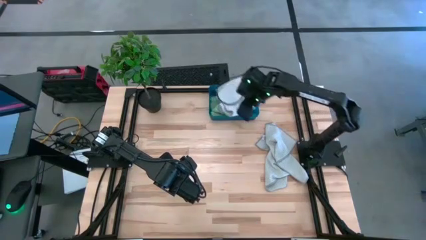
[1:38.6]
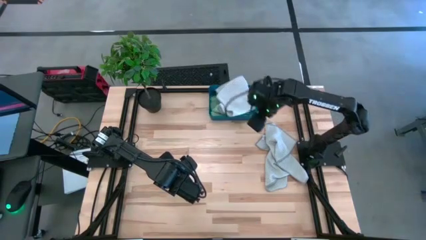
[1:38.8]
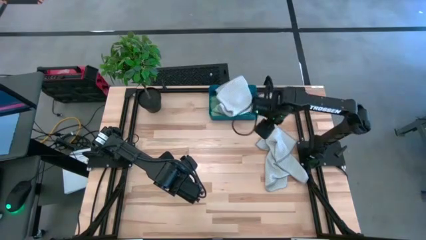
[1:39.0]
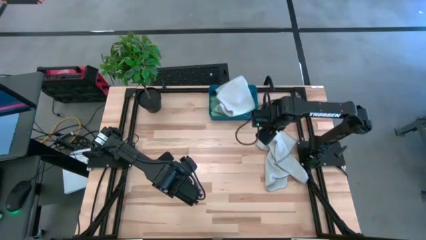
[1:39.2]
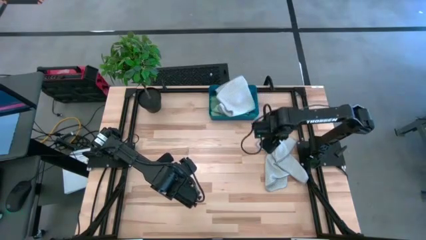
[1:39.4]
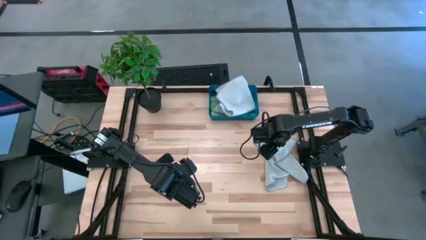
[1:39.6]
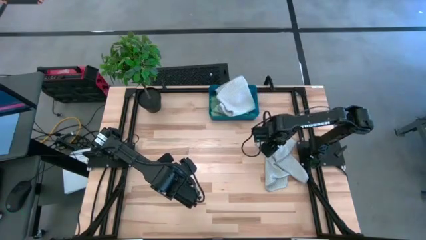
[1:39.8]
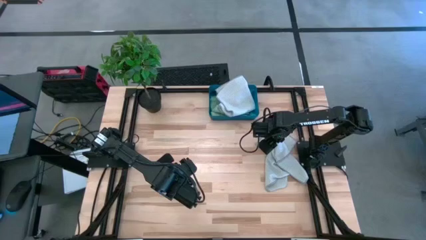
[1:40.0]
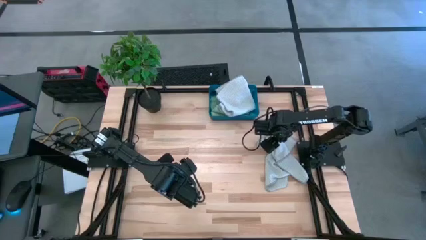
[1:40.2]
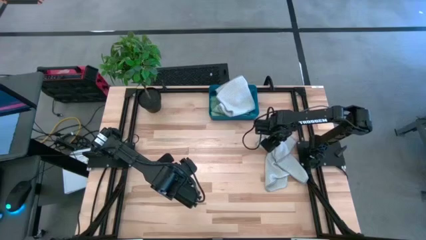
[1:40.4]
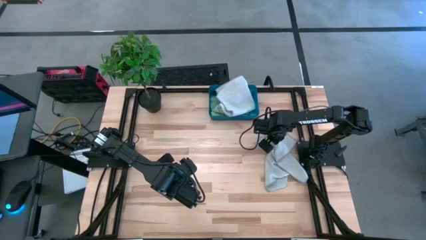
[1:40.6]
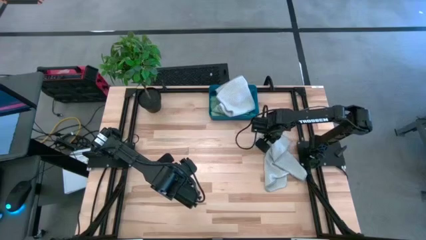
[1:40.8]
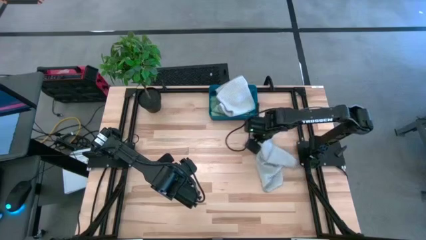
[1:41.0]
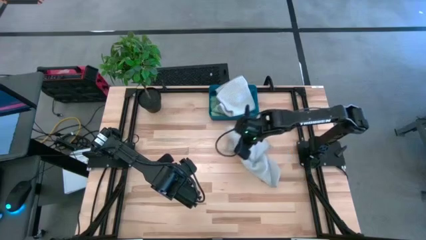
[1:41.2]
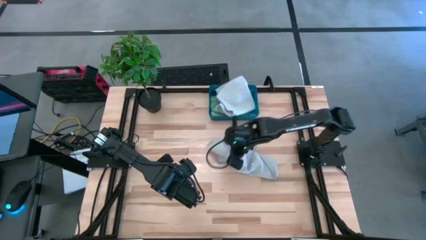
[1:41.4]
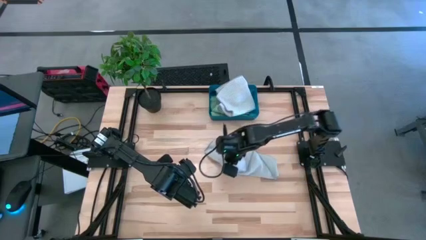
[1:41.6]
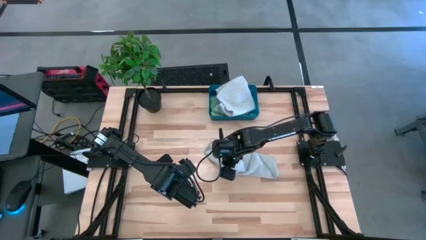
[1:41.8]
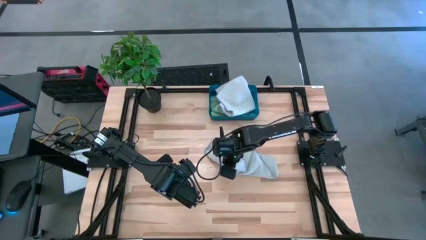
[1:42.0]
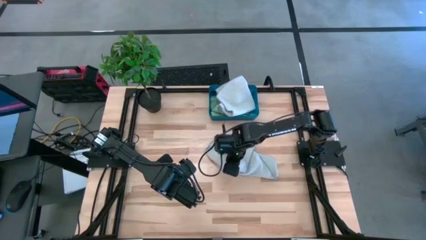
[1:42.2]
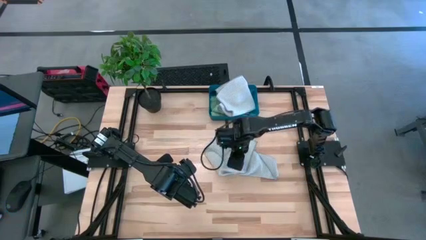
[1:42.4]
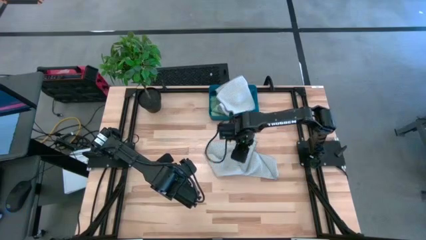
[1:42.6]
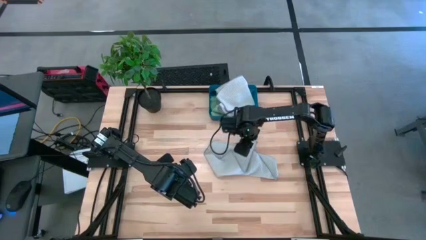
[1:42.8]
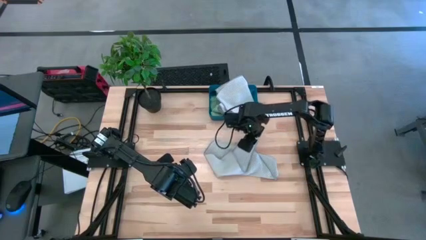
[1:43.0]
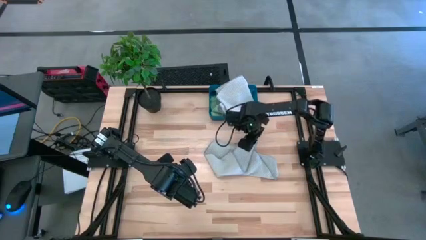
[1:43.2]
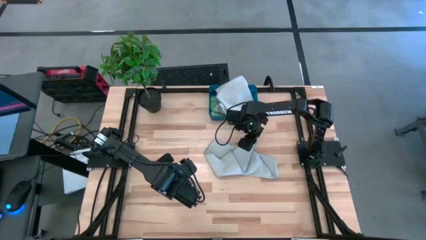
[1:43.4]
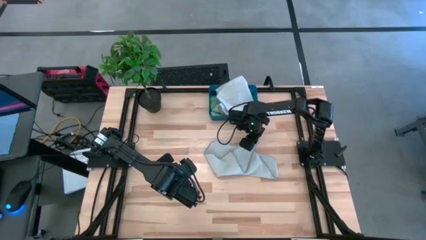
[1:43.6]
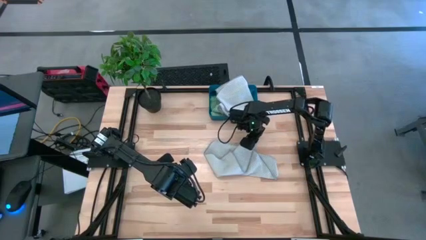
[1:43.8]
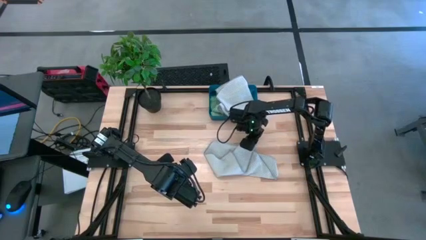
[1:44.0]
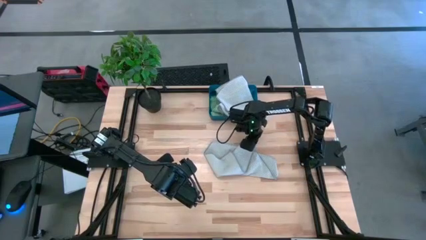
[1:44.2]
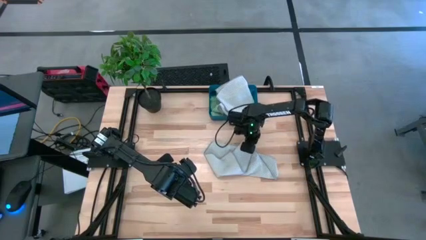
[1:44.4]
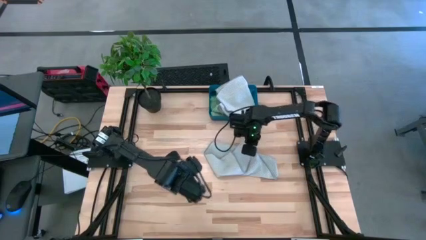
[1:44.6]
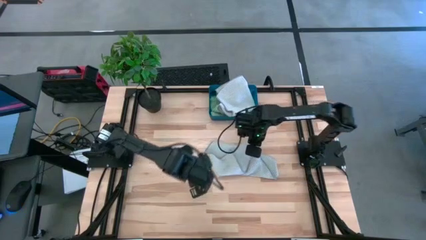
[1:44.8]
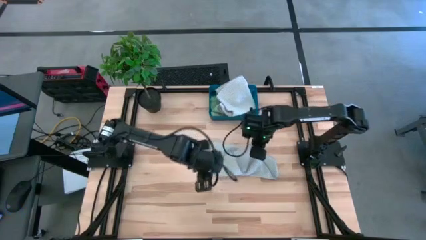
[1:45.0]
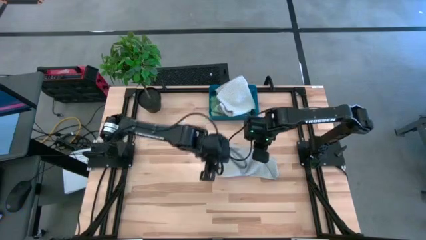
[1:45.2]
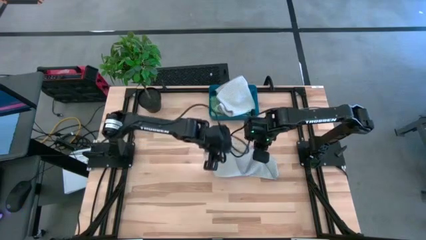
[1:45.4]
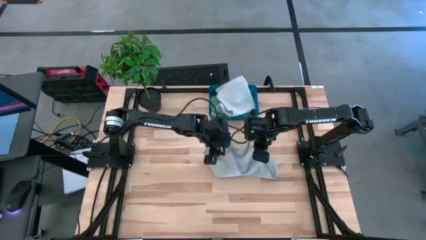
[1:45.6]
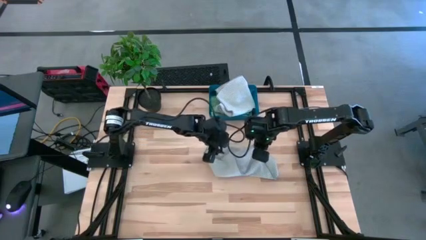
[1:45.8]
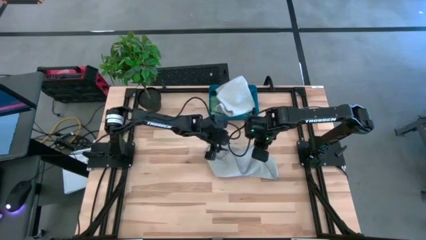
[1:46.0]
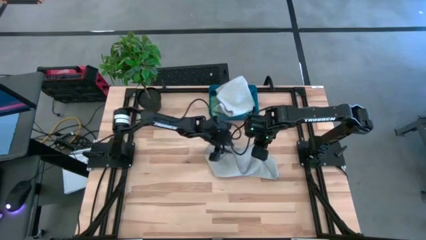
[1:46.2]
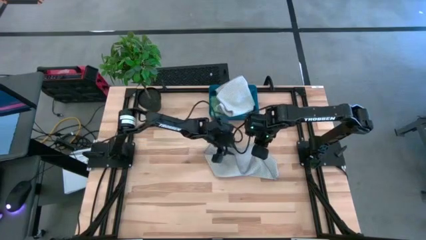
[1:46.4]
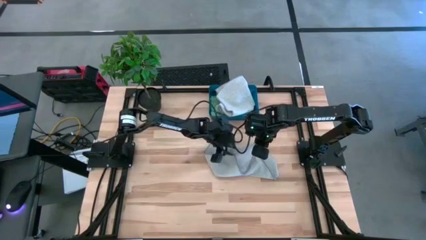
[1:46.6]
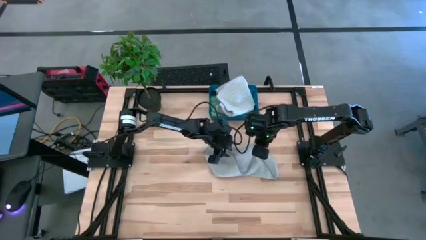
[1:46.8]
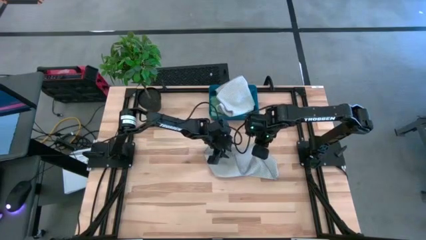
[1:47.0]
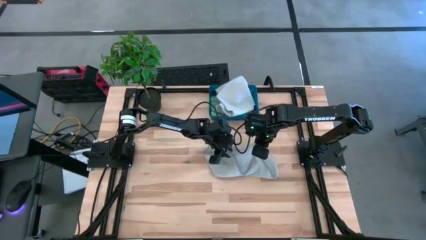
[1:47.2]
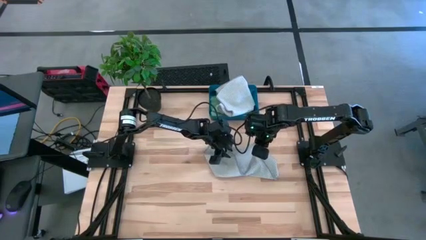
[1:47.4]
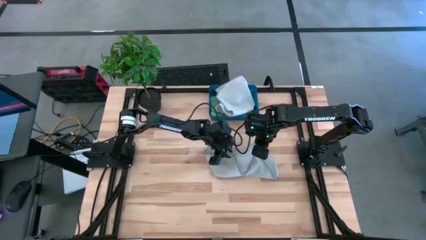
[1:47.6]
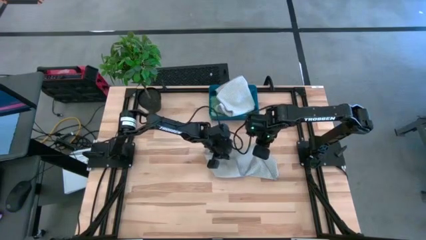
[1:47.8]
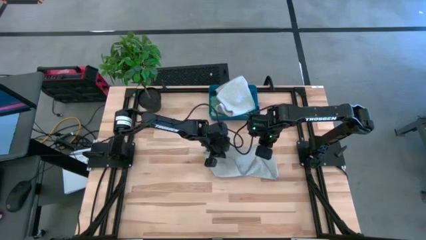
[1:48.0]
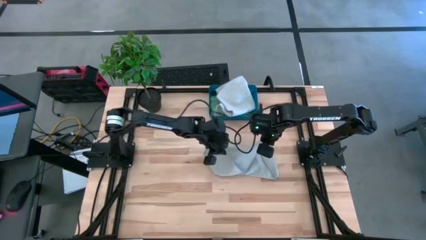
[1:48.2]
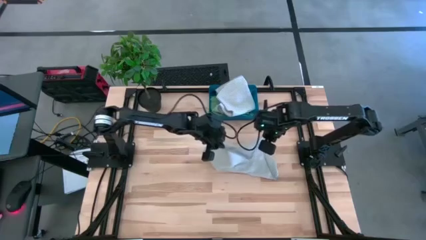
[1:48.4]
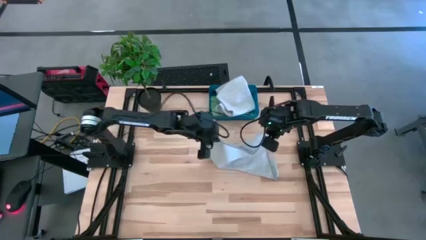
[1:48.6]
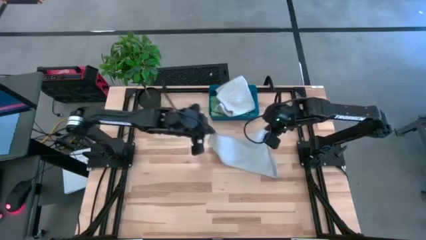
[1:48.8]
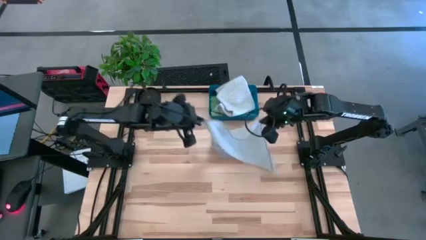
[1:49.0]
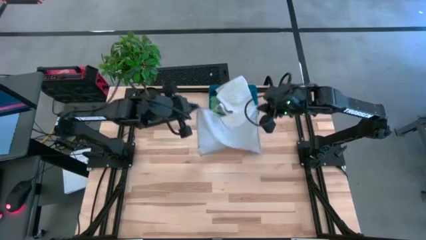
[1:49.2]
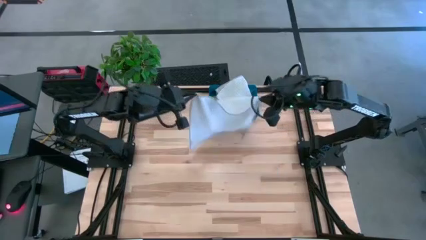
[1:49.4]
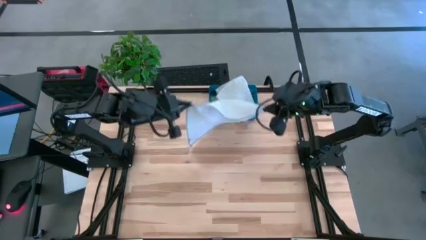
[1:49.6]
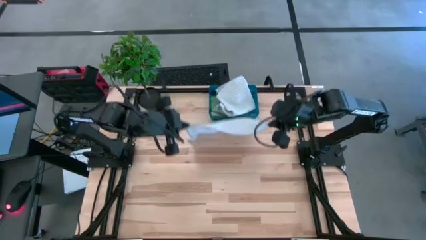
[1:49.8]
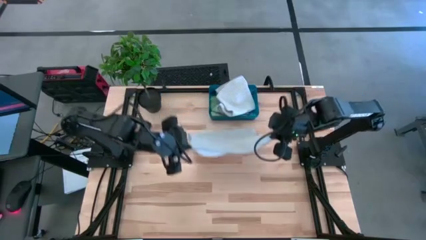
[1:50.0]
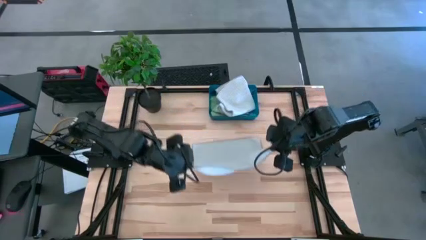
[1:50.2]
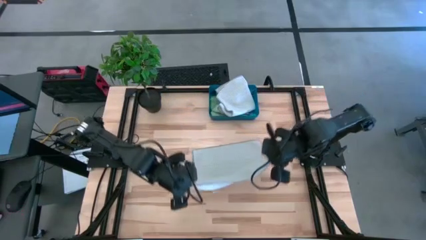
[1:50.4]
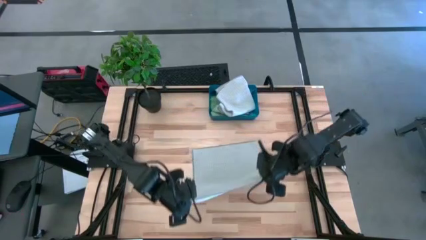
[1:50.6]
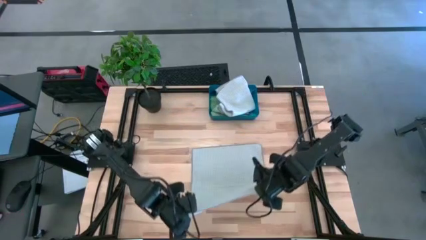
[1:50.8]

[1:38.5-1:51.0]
Task: Fold microfiber towels
Fold the gray towel

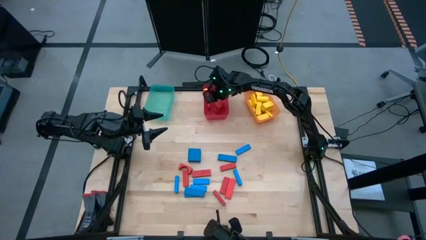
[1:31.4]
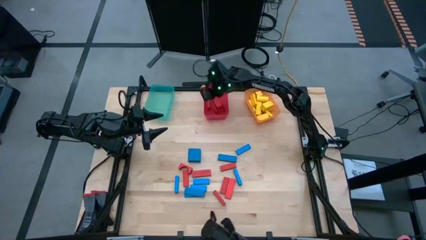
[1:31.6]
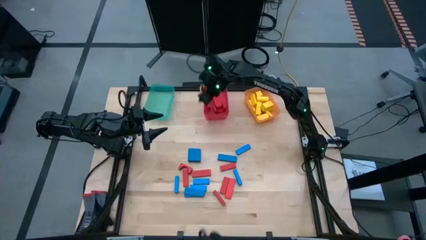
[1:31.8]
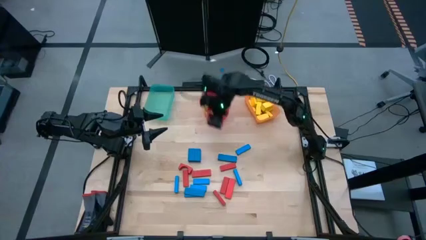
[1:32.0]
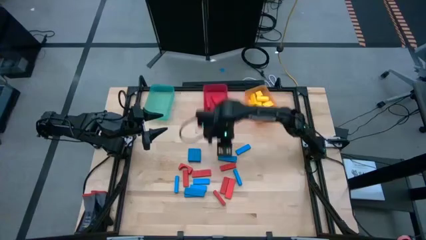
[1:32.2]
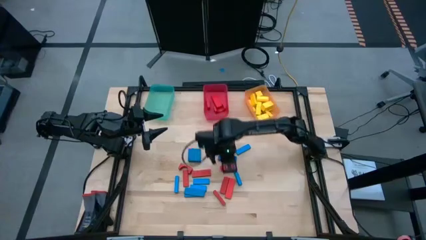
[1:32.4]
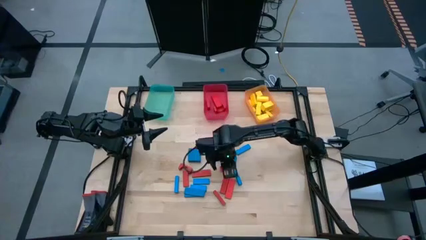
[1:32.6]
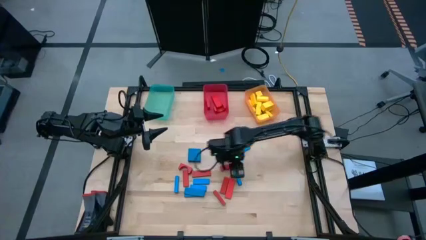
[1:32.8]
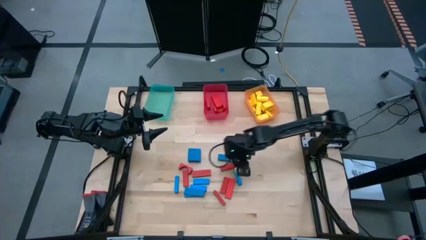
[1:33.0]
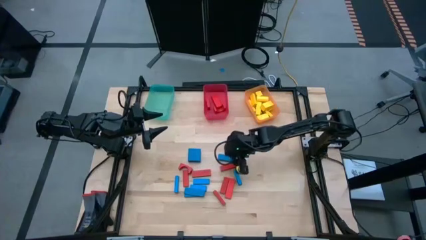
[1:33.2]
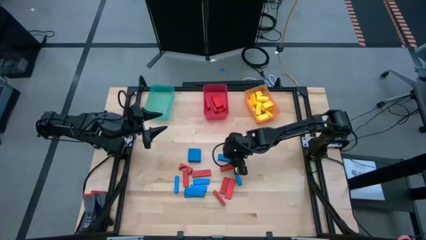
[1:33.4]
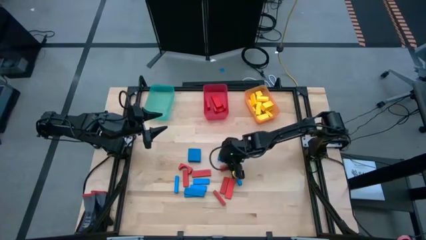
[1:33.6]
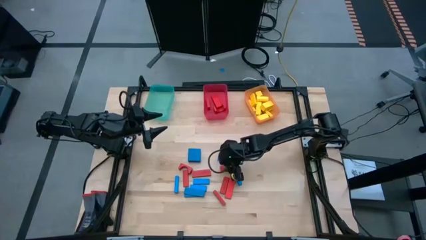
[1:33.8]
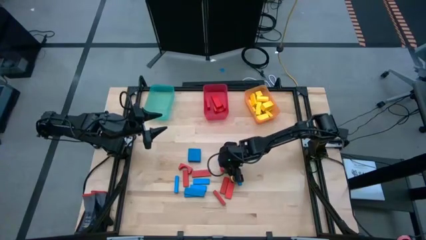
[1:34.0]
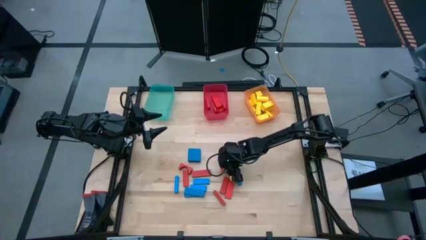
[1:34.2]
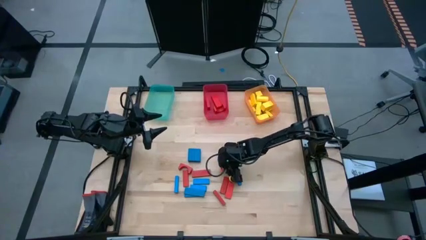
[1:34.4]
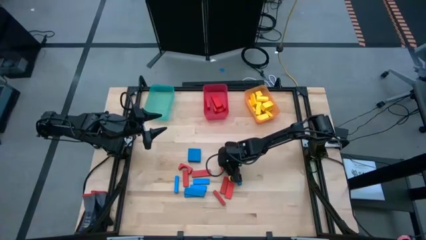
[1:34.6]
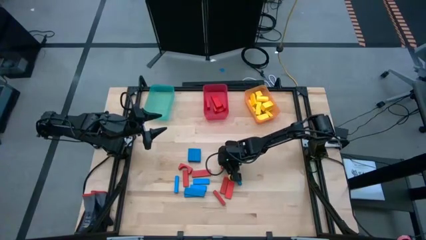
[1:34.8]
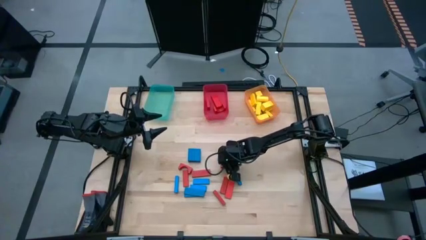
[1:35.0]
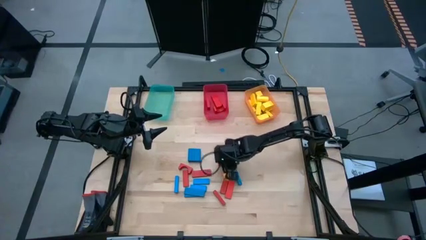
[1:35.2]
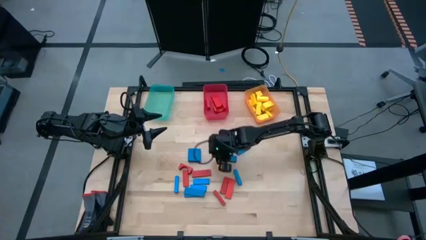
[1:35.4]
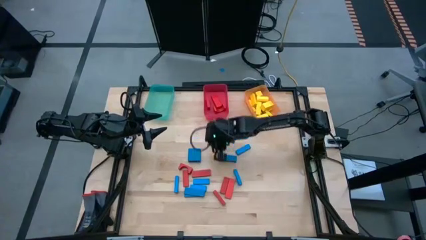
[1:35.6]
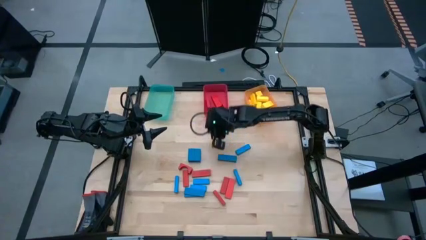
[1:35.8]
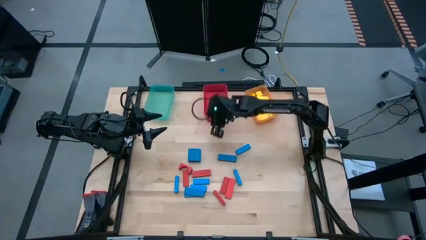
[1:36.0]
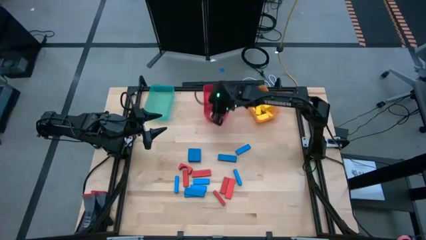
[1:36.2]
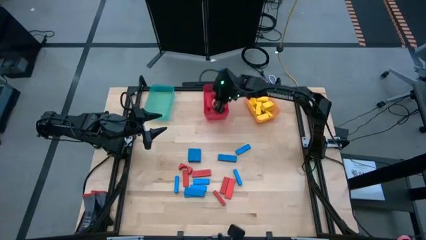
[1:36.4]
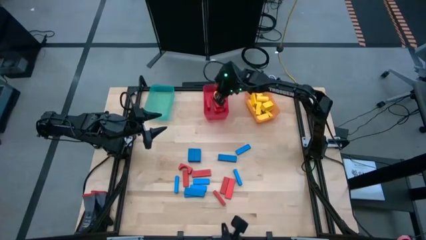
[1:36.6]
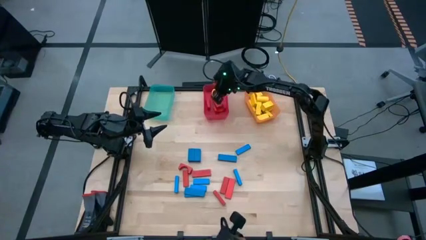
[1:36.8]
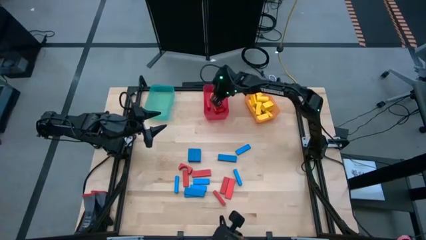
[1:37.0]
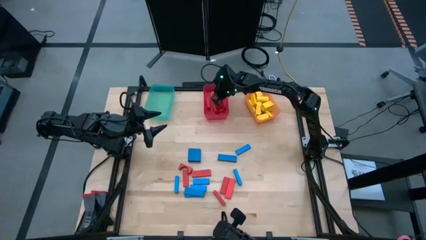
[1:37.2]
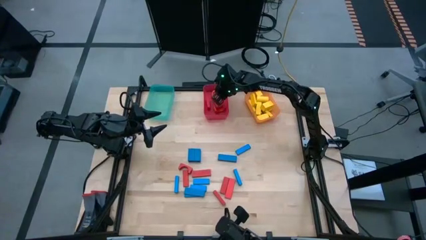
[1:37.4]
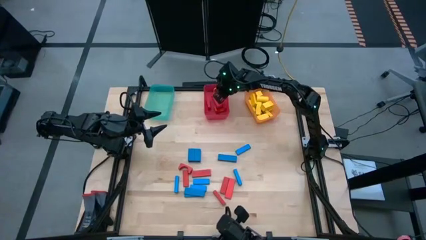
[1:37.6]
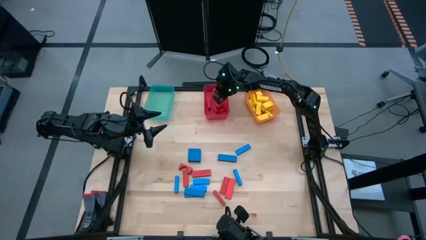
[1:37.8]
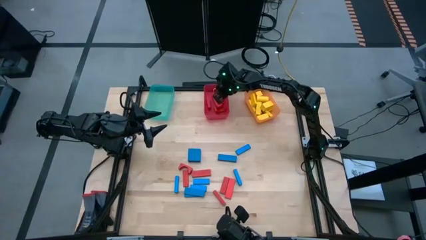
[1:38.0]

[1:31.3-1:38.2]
Task: Sort blocks
Put the red block into the red bin
